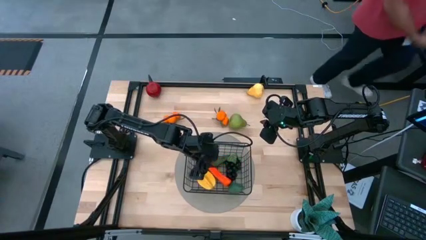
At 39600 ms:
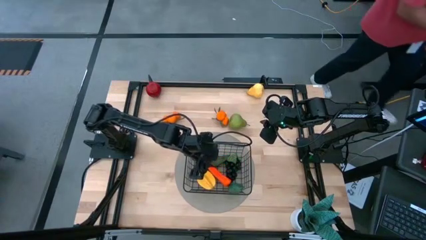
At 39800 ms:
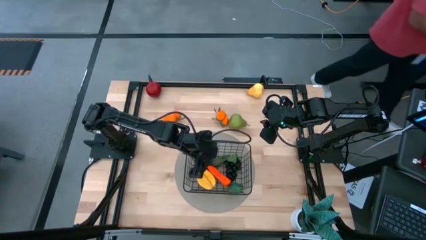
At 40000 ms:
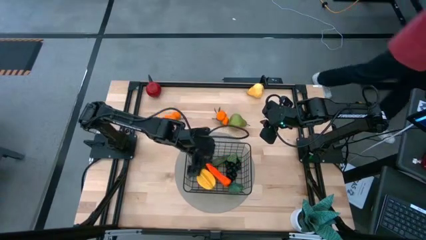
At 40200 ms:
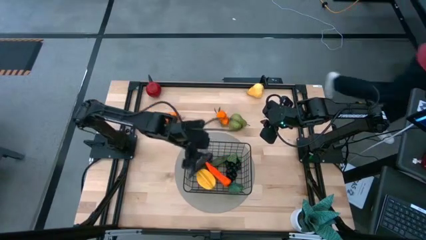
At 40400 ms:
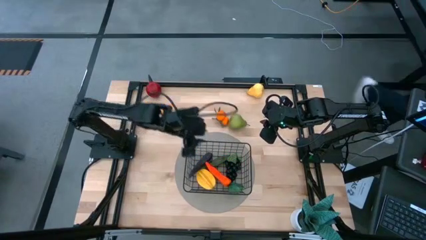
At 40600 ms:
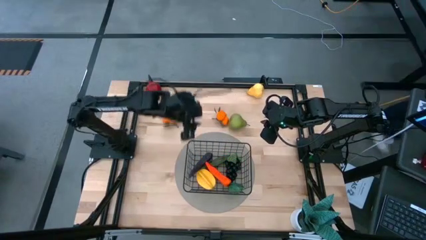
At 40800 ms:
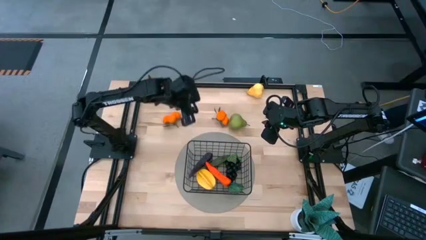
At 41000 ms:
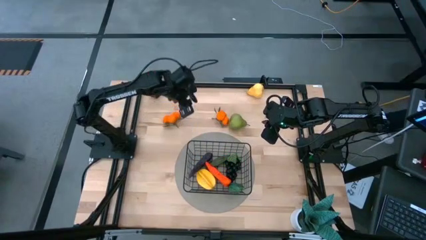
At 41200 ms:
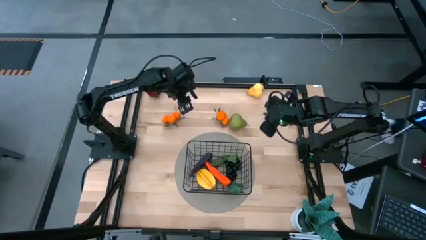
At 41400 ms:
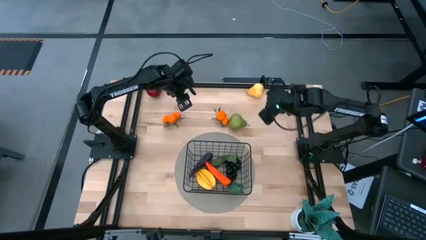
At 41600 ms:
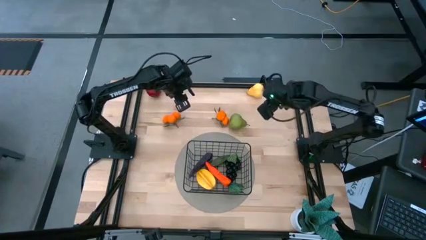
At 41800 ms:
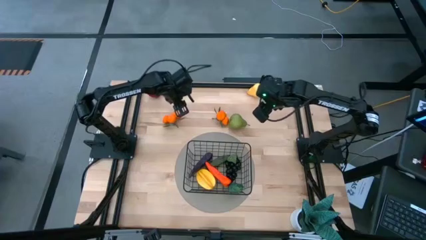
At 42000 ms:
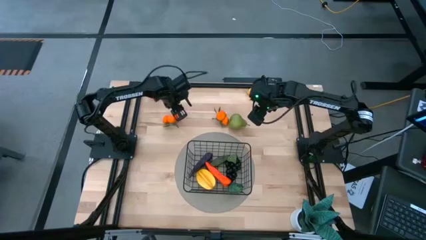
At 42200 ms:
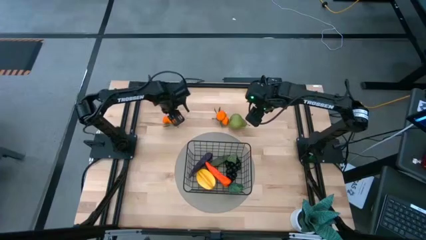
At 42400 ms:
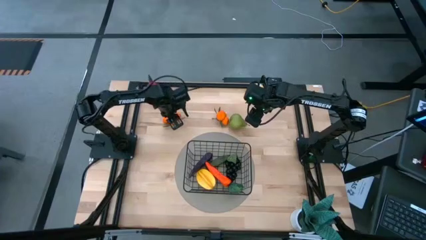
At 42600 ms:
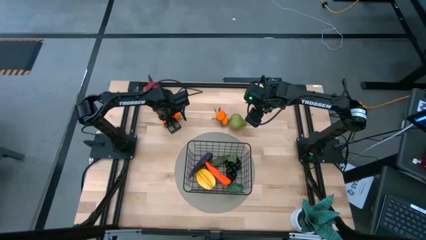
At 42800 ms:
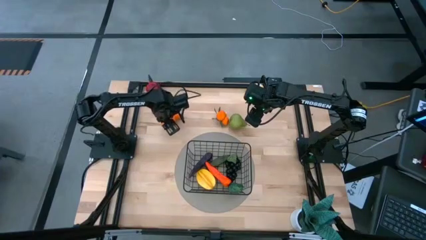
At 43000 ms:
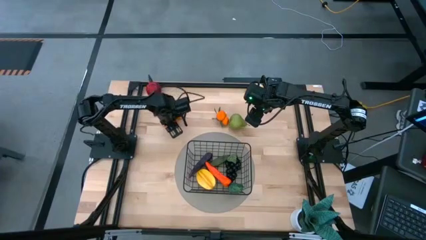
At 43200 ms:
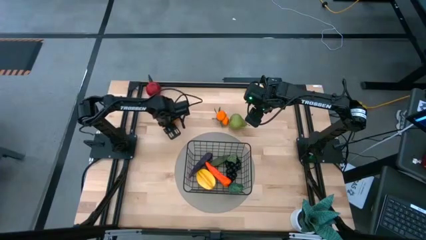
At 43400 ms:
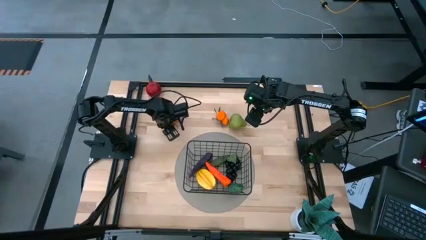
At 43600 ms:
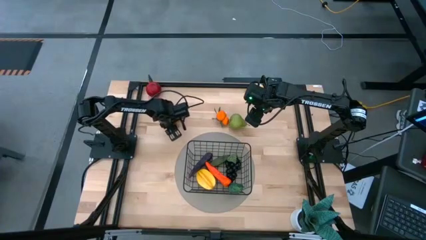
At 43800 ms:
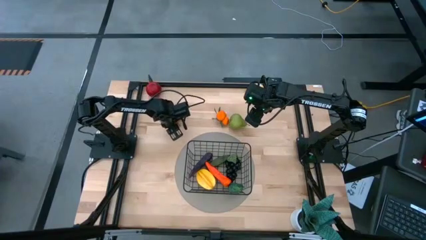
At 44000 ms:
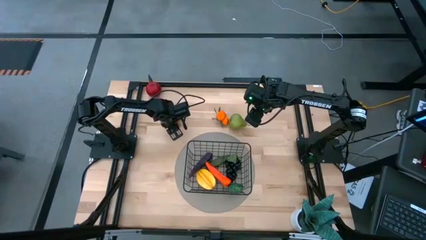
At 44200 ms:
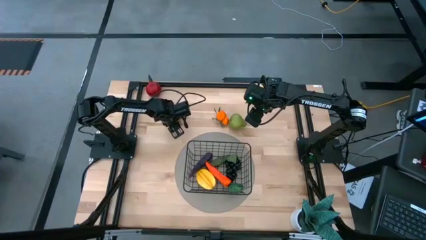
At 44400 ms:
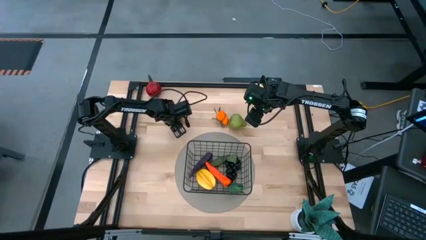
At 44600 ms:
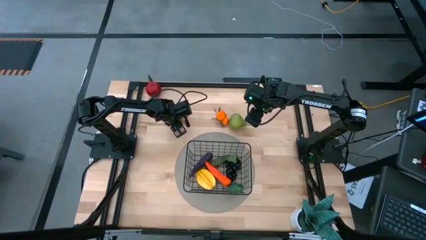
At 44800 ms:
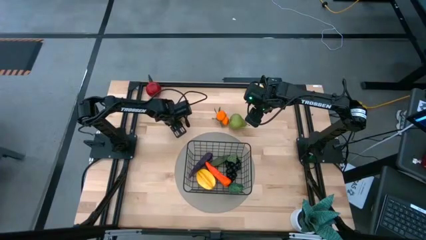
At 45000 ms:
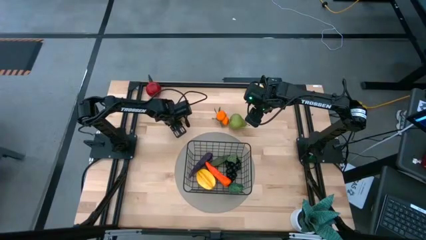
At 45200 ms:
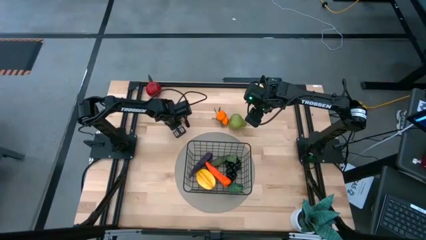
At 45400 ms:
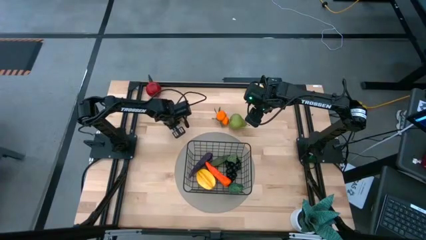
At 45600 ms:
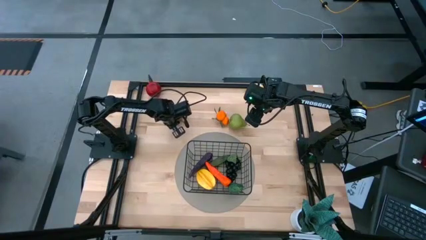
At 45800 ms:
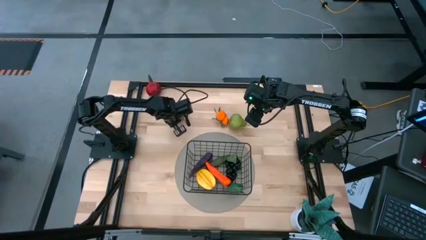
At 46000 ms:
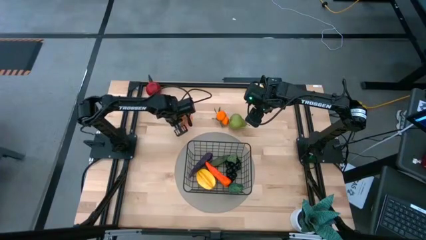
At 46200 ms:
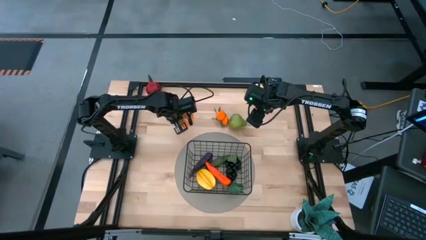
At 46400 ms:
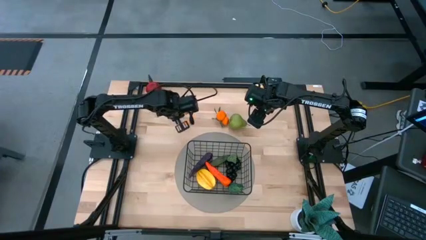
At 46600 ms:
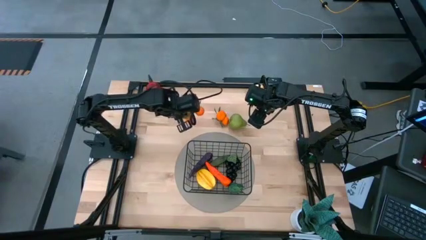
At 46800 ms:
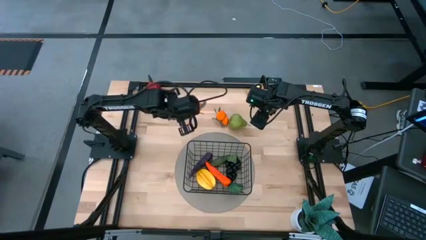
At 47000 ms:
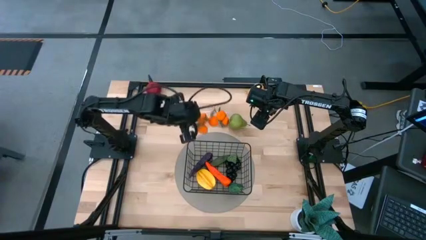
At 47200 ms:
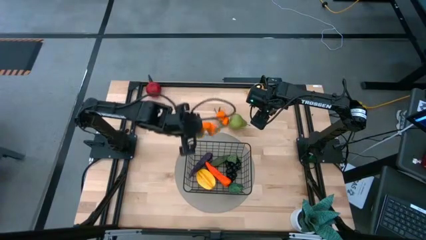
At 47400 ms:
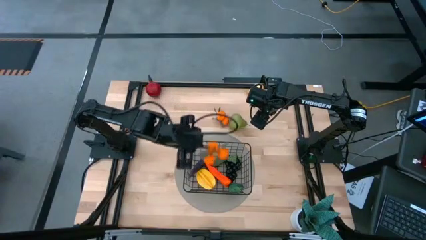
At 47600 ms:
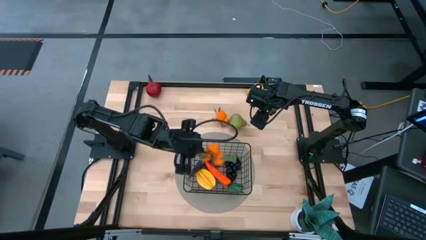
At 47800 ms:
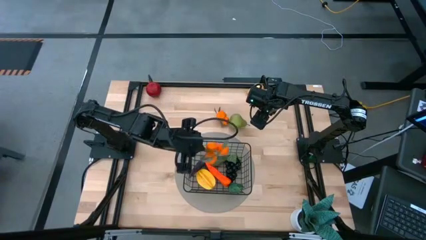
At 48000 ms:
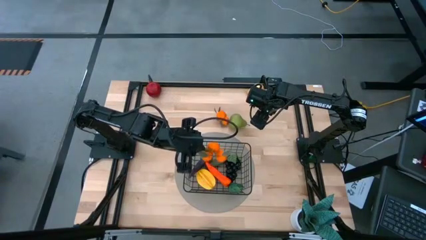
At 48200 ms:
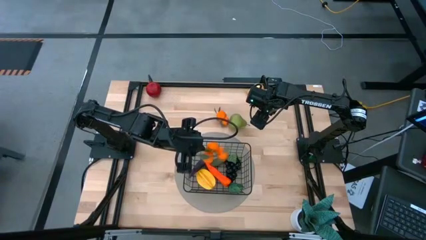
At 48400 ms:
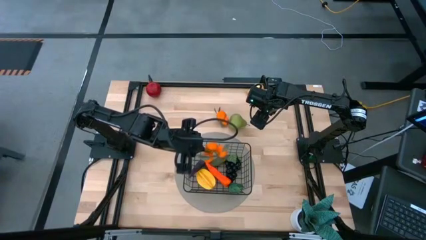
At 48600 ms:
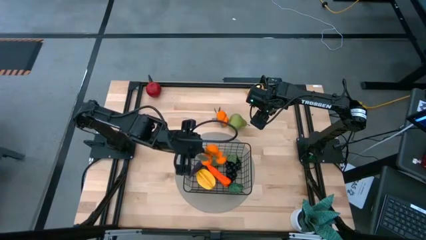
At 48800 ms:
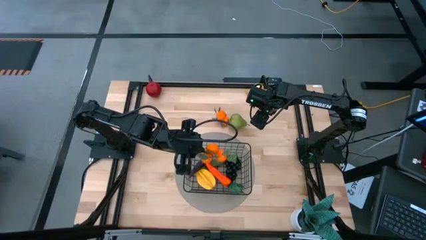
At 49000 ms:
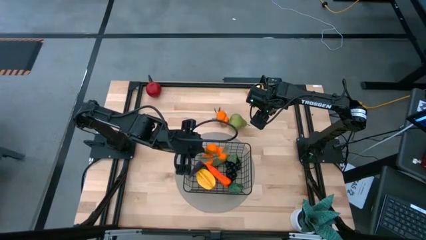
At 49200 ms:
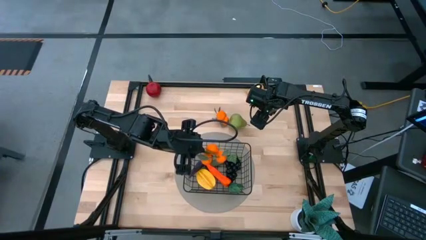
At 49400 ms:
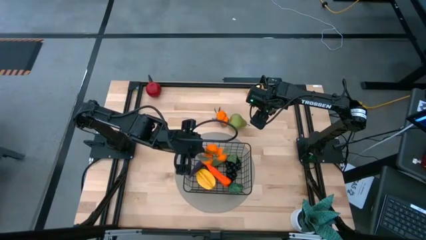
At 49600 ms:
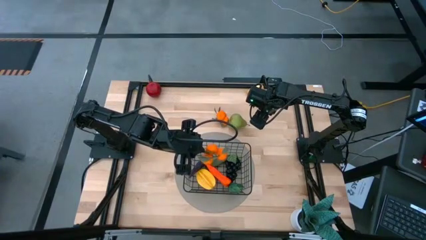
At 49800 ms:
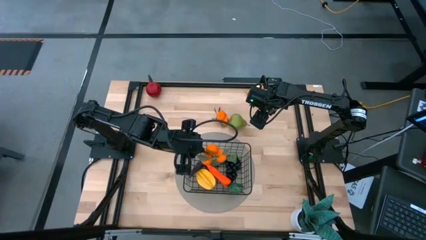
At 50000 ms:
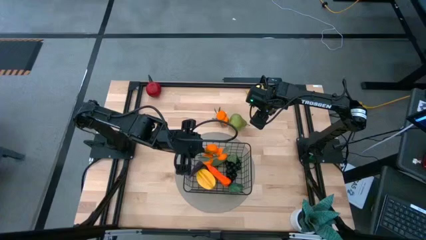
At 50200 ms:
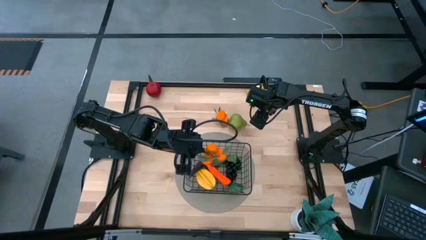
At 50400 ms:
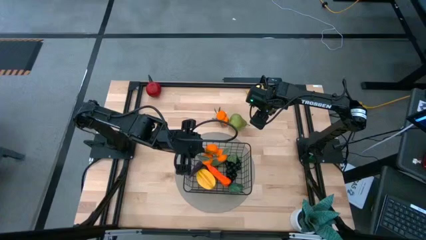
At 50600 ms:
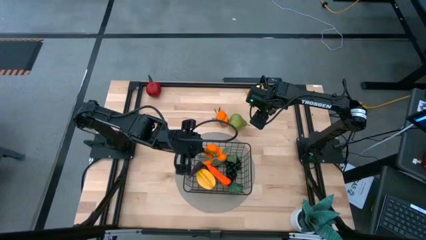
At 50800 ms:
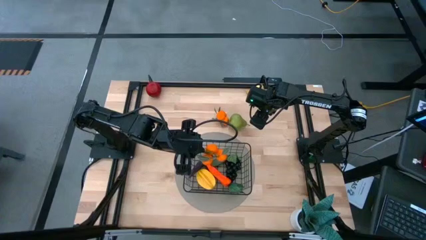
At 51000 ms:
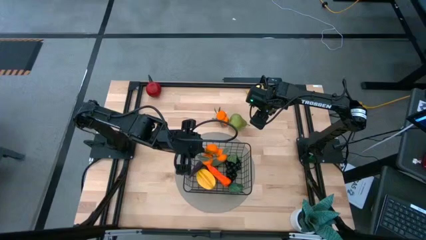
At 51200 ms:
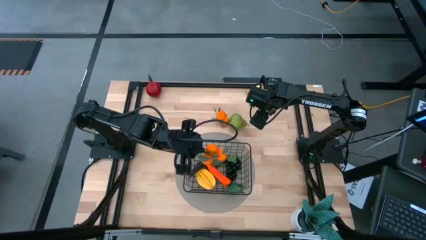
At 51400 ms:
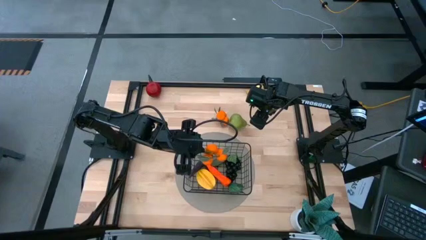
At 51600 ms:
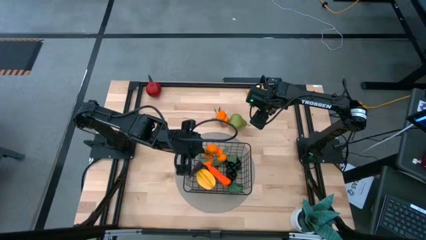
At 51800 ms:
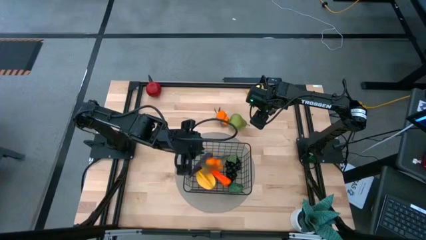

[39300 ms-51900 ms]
Task: Build produce basket
Put the left oranges into the wire basket

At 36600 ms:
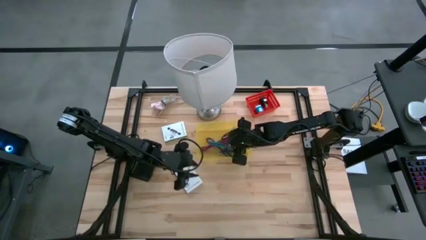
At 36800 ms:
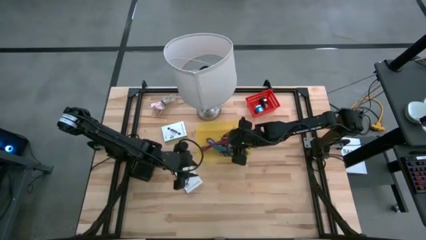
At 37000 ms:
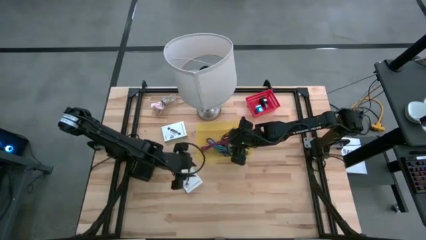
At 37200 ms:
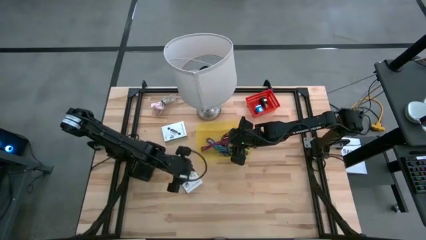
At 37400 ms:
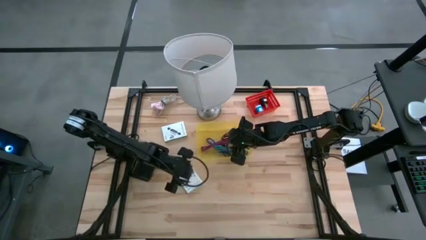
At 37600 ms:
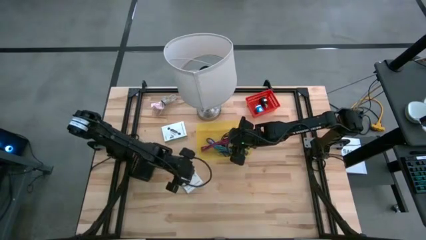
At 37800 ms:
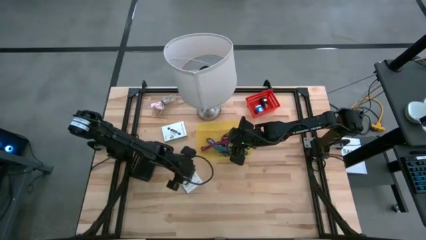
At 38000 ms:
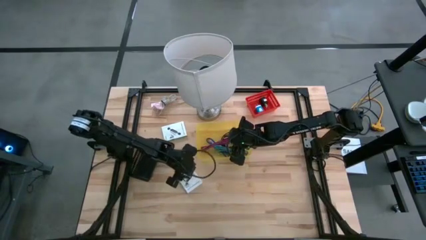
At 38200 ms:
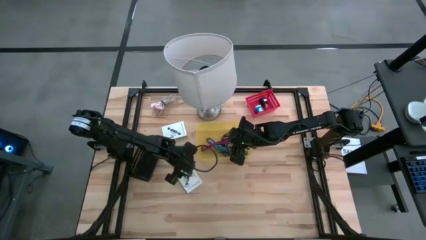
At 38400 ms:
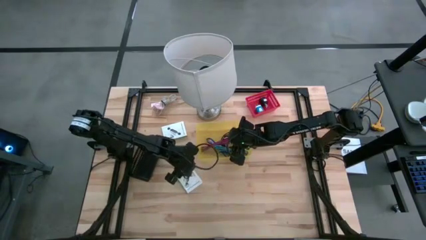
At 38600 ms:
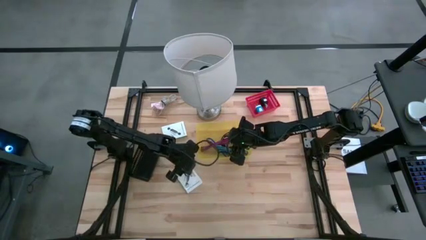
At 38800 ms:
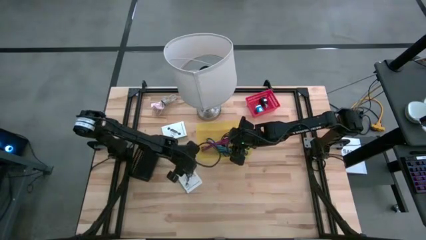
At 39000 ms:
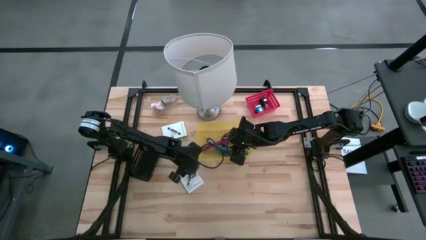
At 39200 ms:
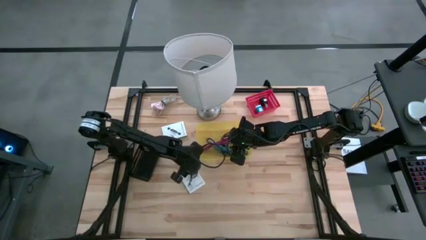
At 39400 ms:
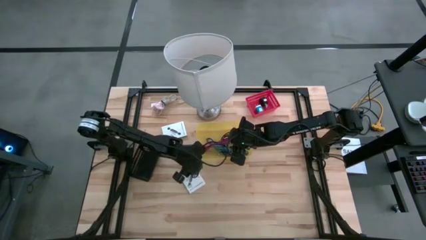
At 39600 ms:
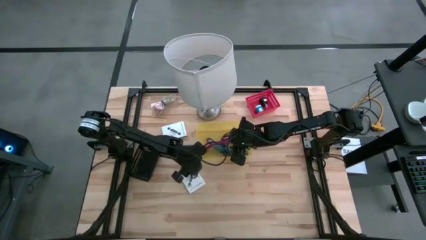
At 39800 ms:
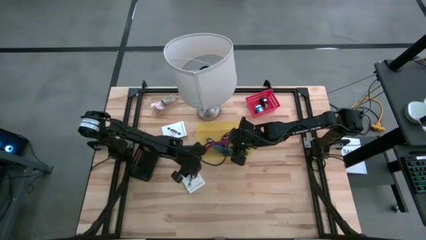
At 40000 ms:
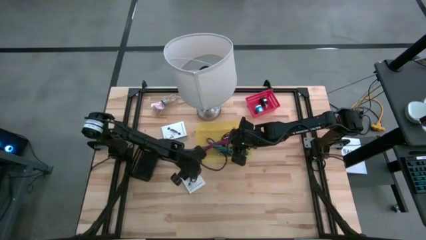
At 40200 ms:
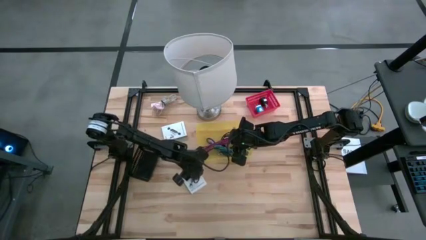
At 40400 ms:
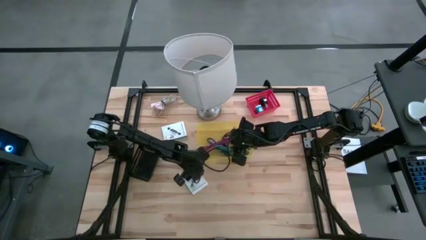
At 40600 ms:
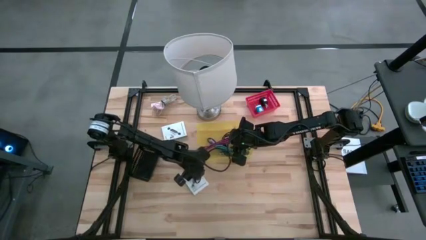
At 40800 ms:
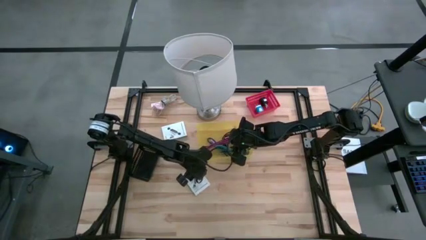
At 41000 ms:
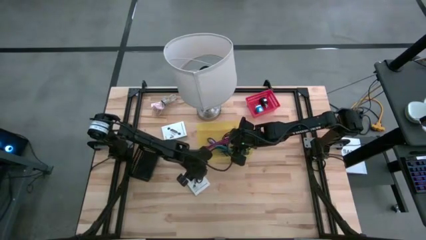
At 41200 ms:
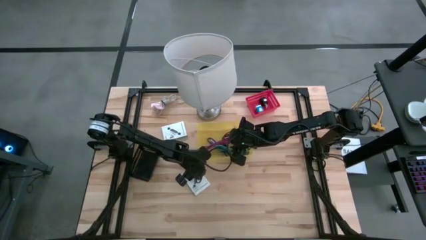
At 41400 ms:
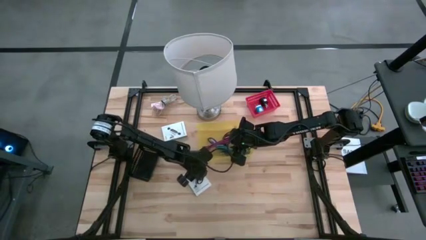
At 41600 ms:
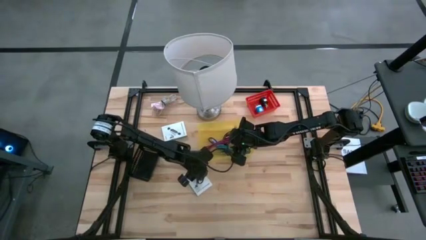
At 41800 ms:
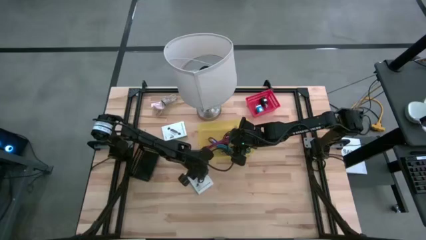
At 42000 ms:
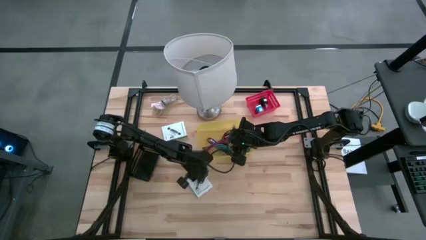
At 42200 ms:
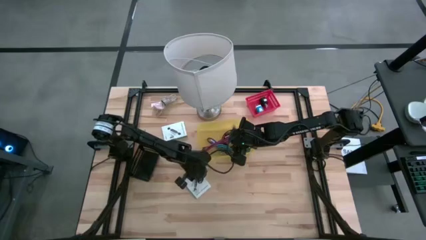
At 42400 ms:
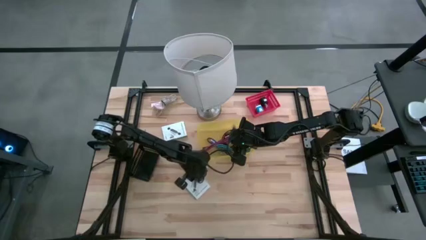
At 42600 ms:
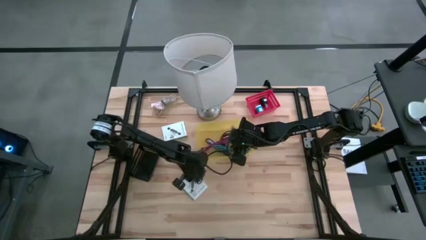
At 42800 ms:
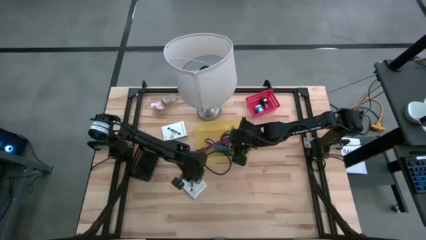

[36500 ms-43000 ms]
Task: Pick and place items into bin
Put the bottom white card reader box into the black bin
